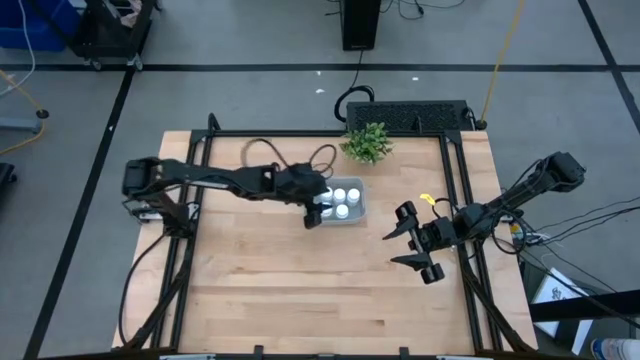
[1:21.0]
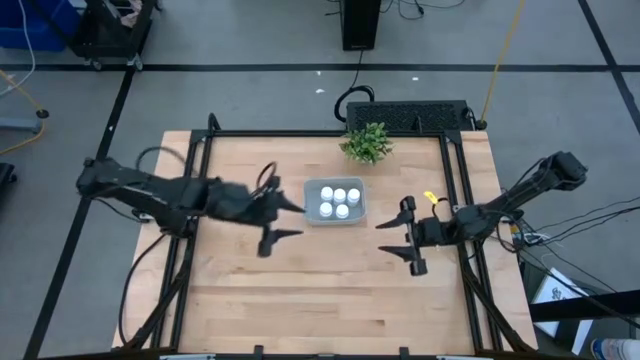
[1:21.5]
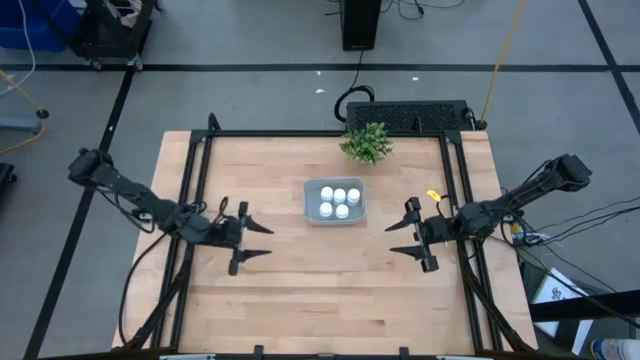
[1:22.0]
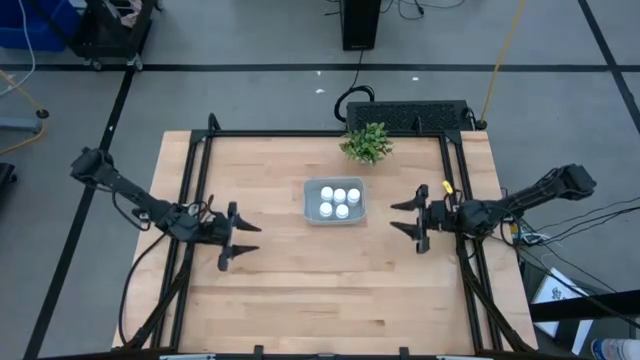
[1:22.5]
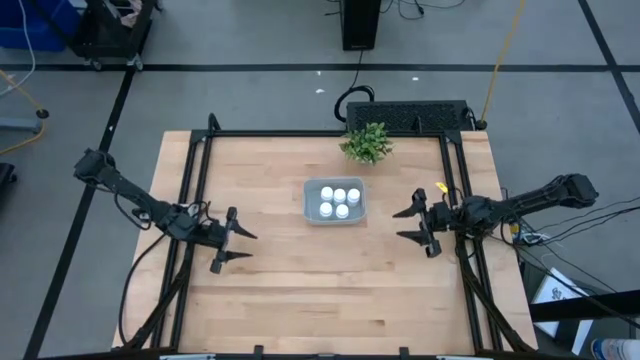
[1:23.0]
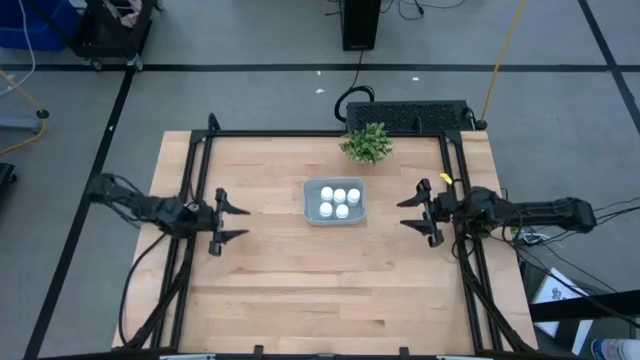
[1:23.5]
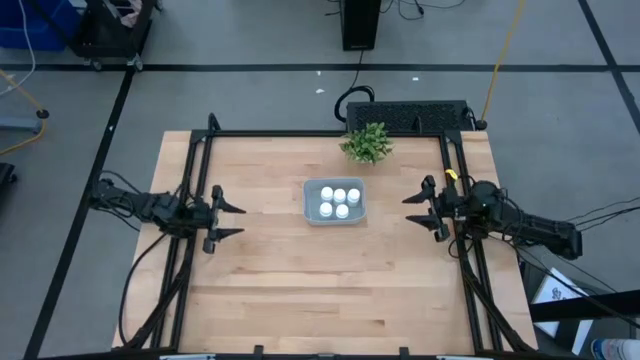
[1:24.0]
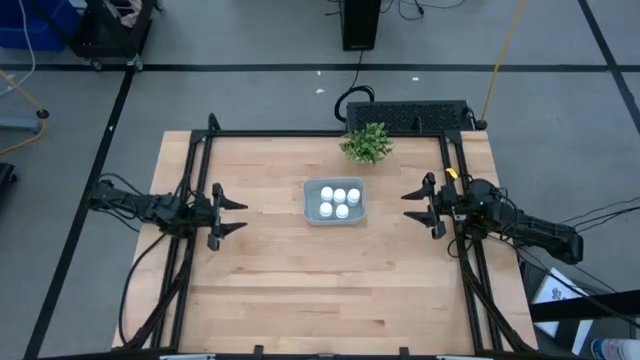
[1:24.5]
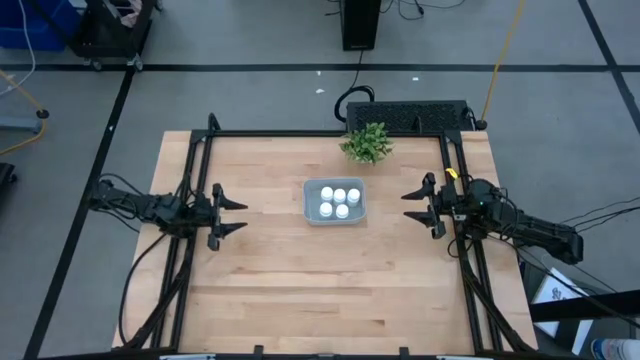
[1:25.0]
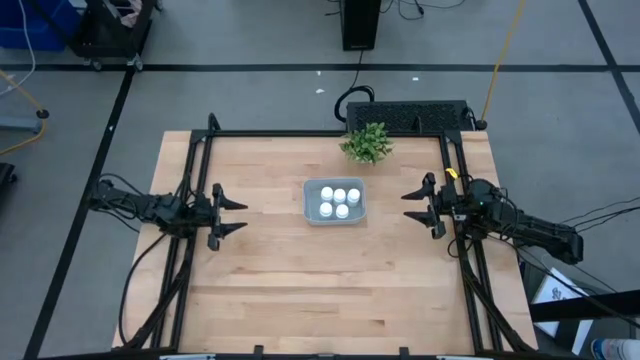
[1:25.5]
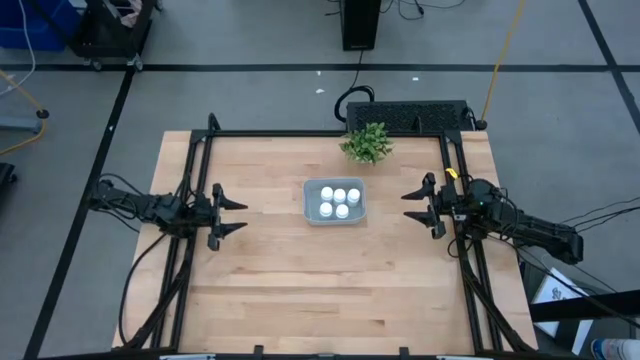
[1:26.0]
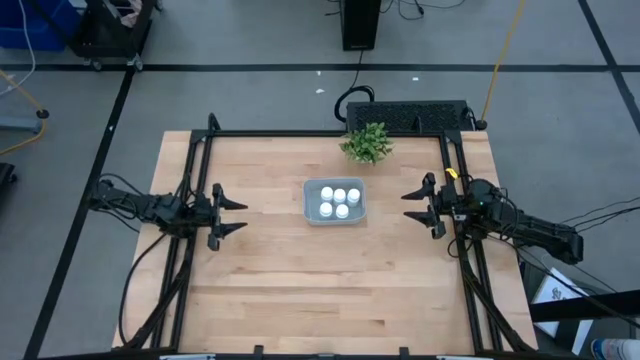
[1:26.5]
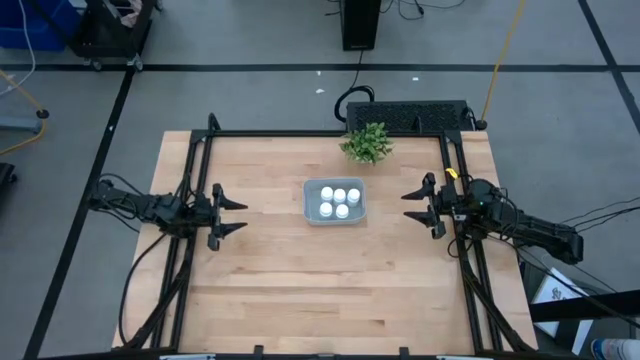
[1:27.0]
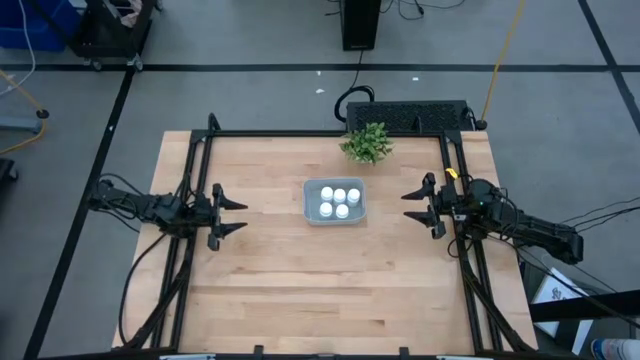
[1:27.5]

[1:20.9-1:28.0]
Task: Pick and place pill bottles into a basket
Return to Home Position

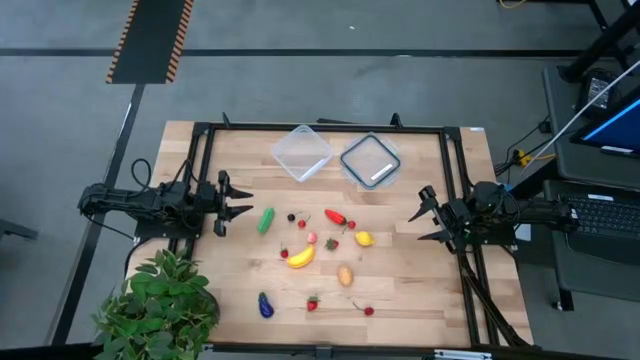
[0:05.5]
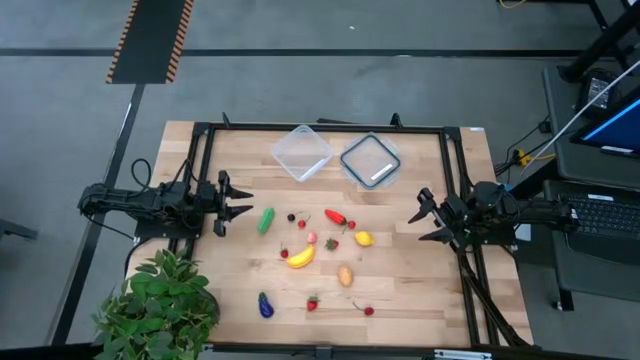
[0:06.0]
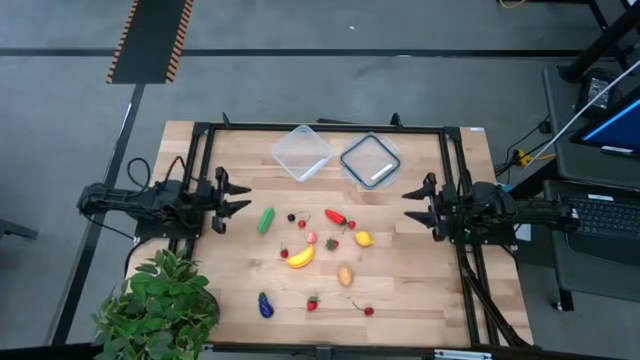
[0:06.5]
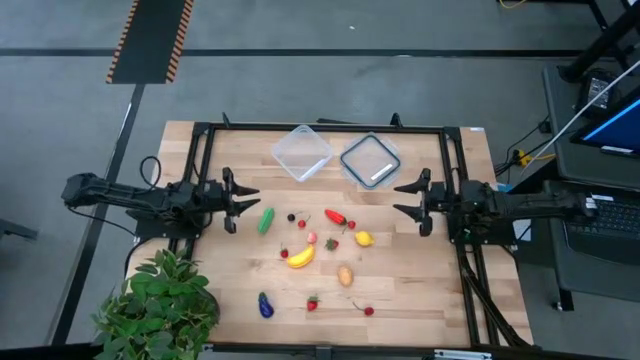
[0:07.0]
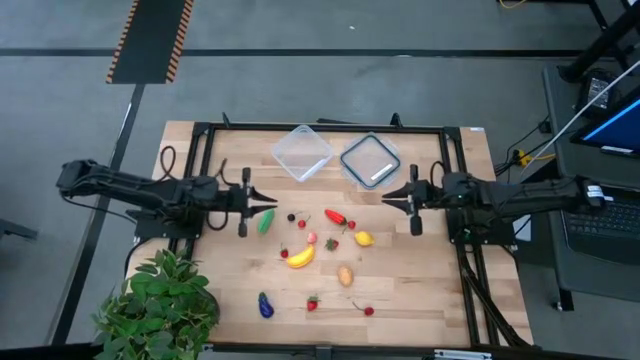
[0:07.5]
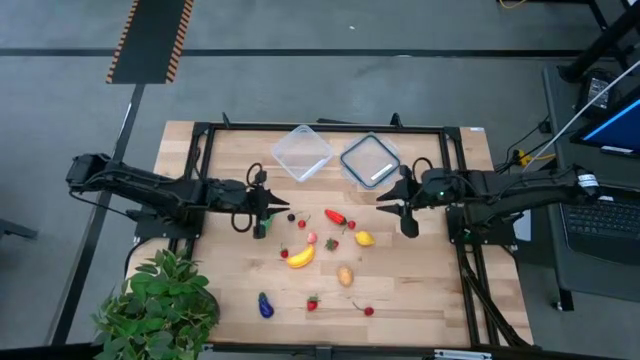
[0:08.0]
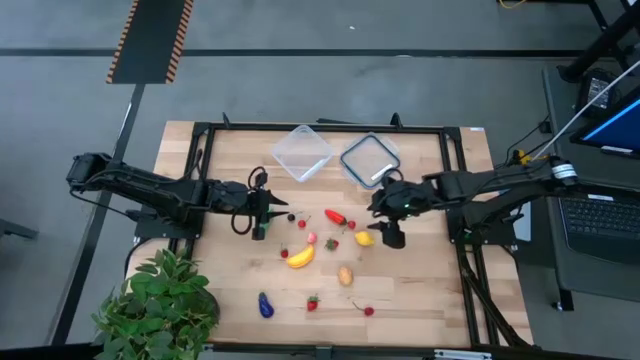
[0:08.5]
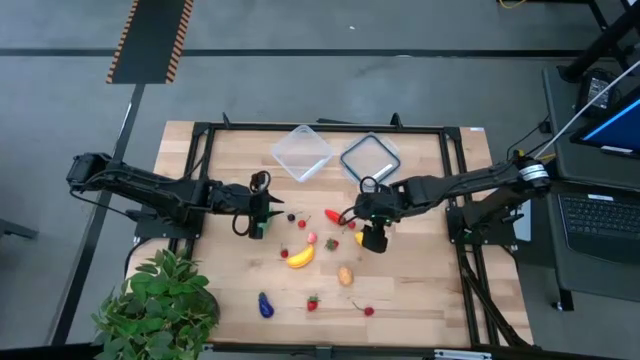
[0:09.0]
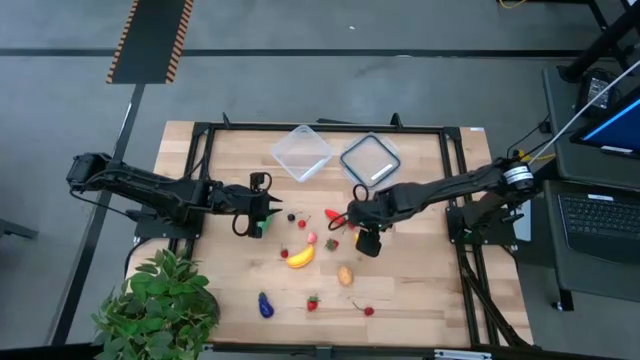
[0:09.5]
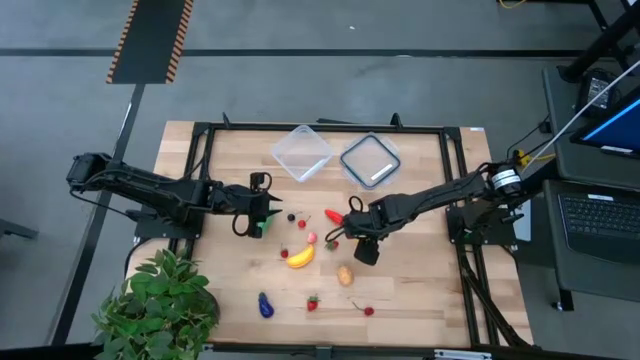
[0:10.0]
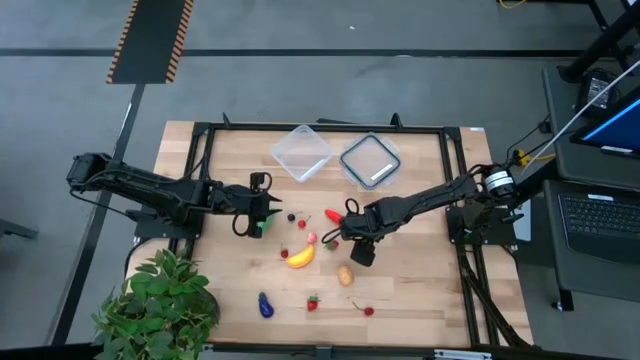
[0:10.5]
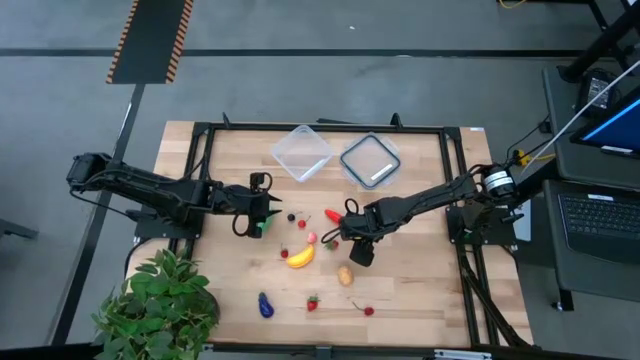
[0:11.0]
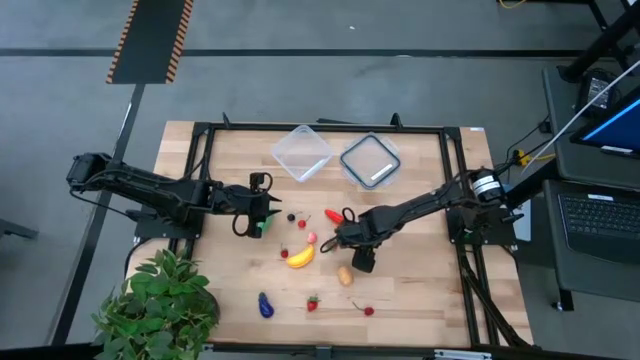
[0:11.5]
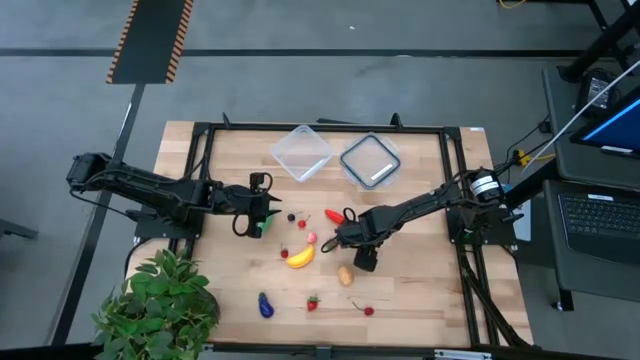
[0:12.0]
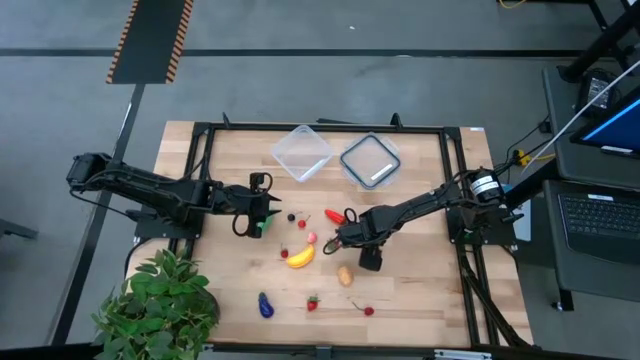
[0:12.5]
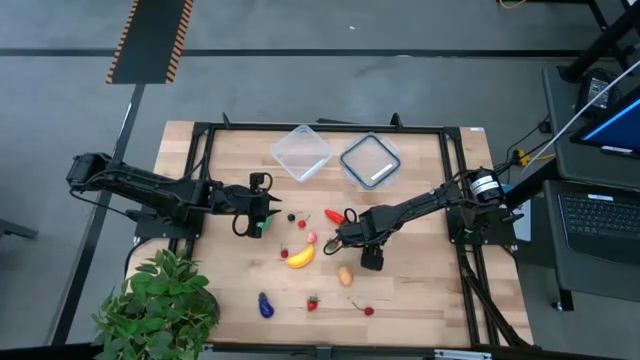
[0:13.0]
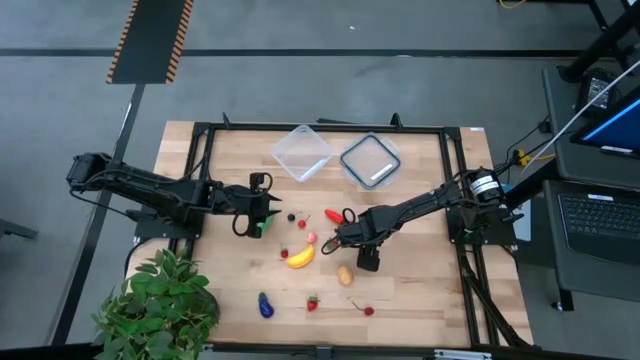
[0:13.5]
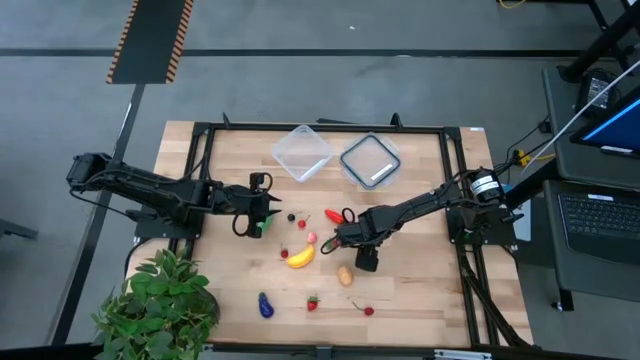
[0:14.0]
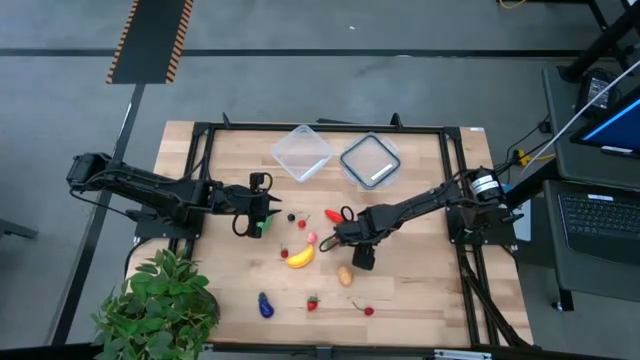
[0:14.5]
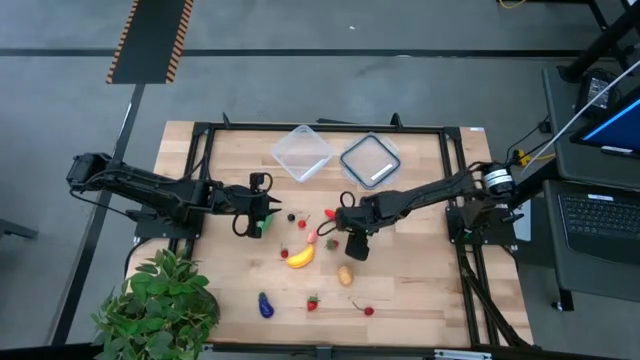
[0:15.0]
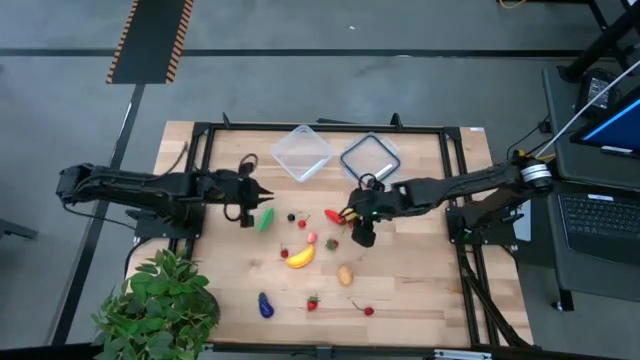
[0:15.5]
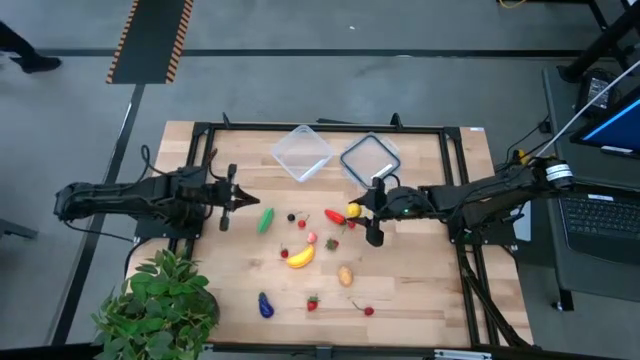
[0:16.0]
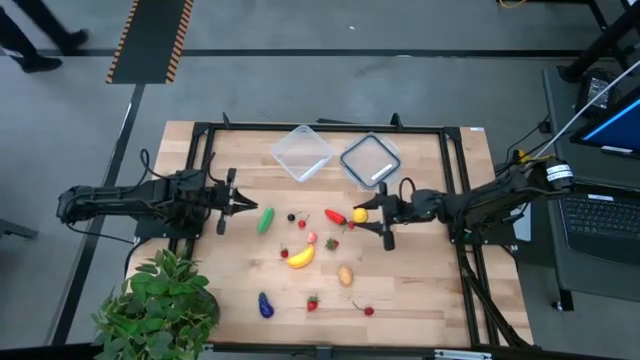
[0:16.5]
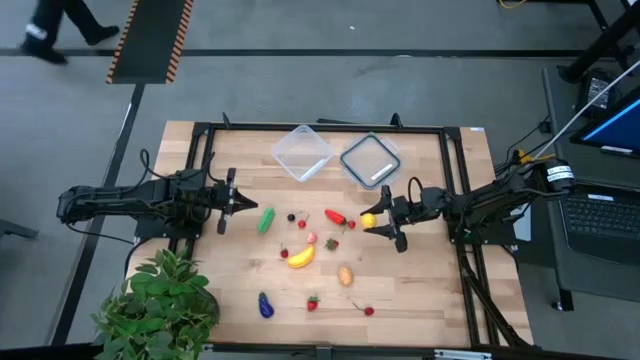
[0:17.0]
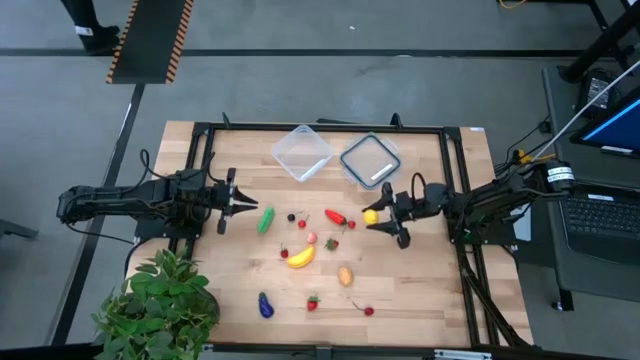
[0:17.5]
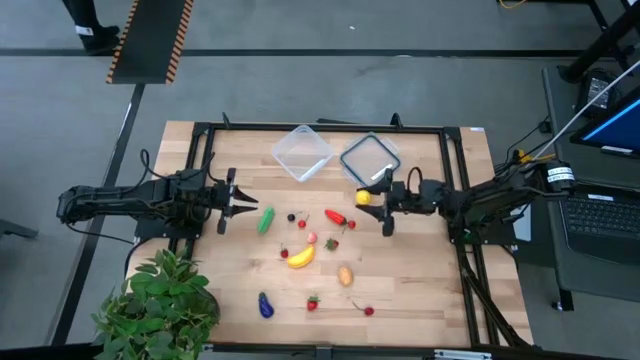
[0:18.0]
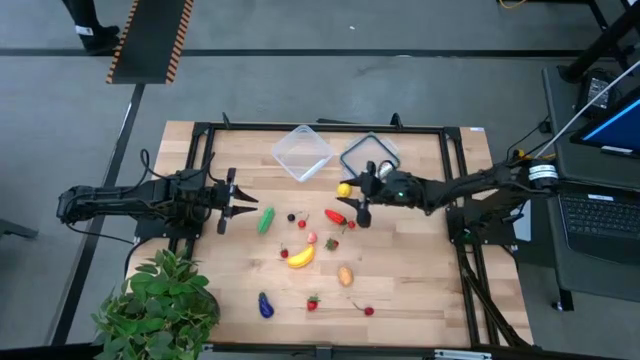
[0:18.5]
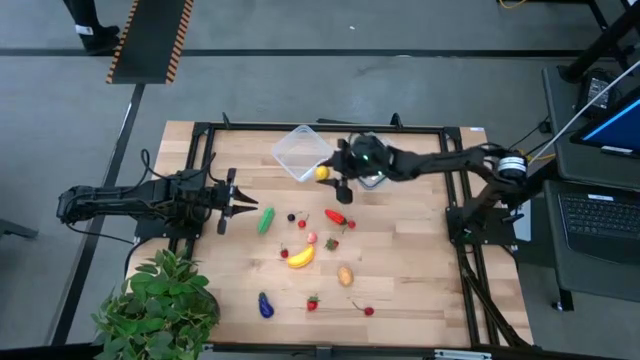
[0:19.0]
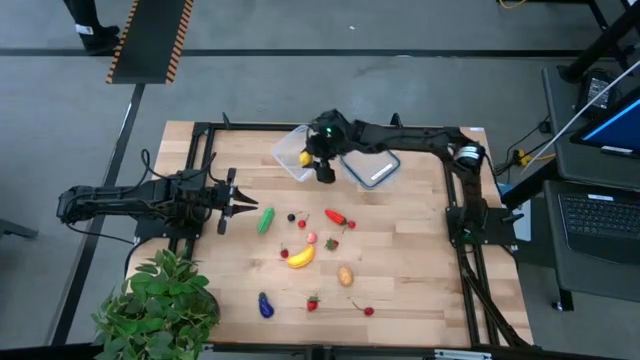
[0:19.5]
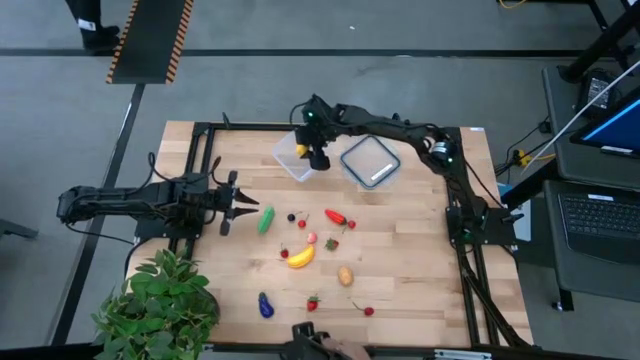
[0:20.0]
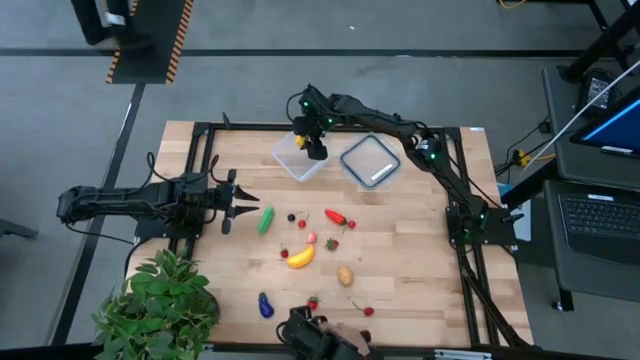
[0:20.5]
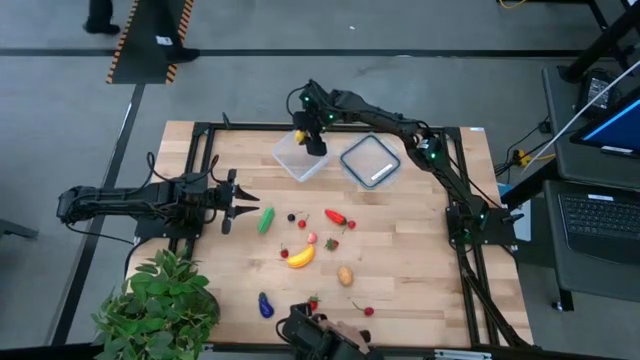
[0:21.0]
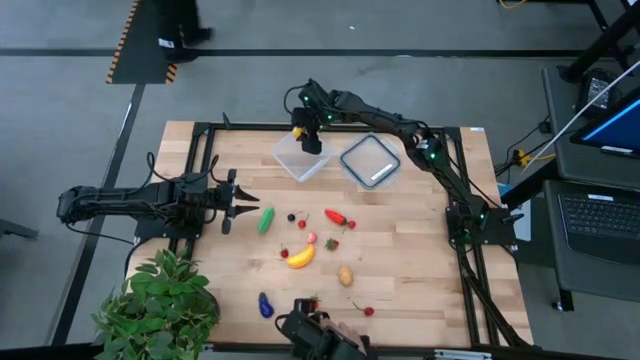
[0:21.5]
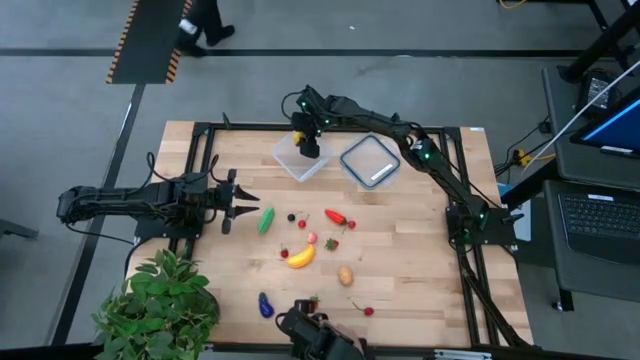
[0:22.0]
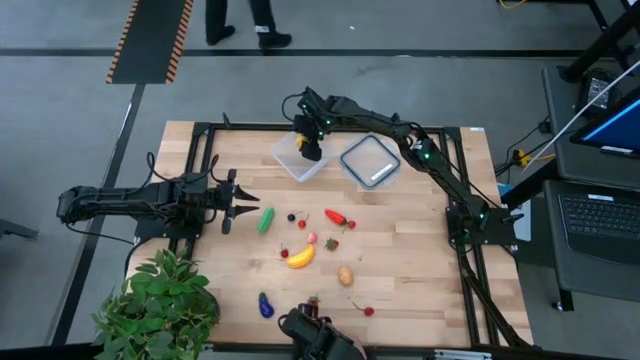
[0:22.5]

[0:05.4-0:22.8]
Task: Pick and placing Produce into tupperware
Put the lemon into the transparent container
